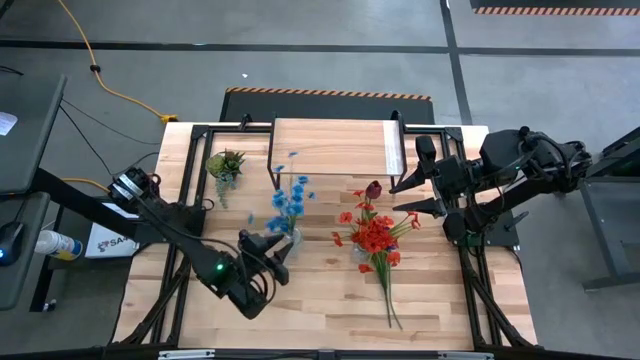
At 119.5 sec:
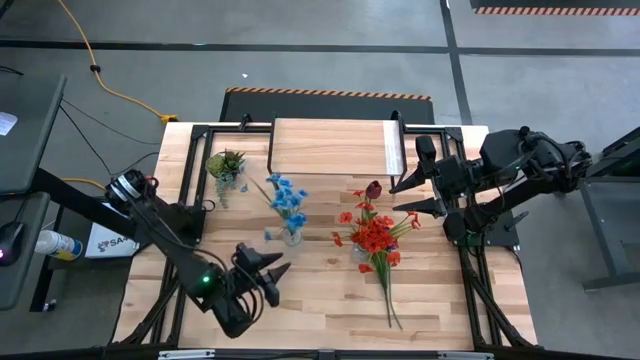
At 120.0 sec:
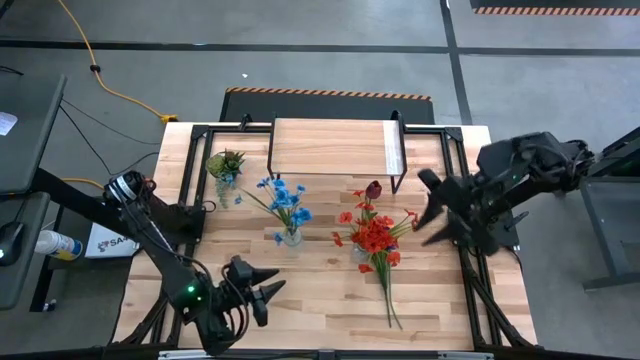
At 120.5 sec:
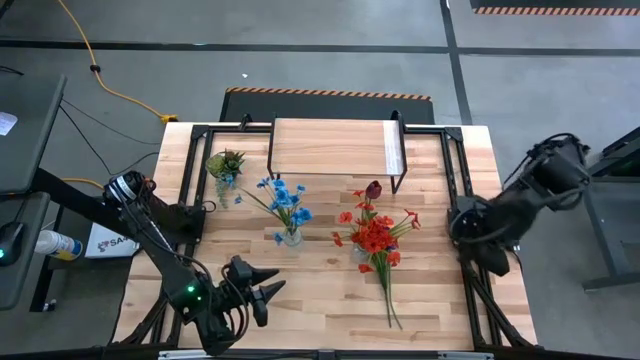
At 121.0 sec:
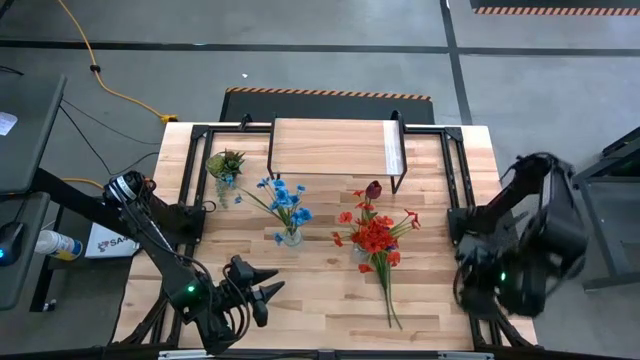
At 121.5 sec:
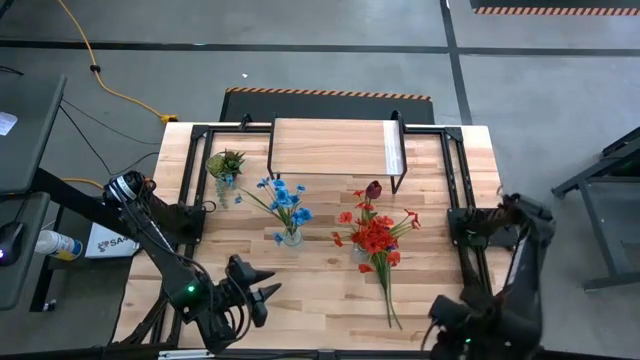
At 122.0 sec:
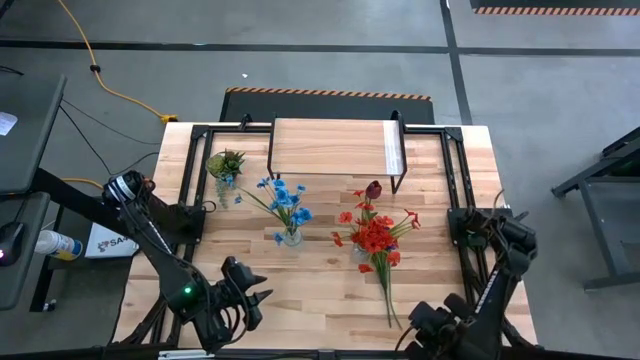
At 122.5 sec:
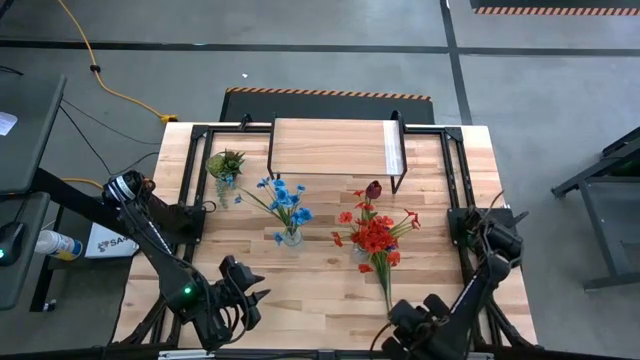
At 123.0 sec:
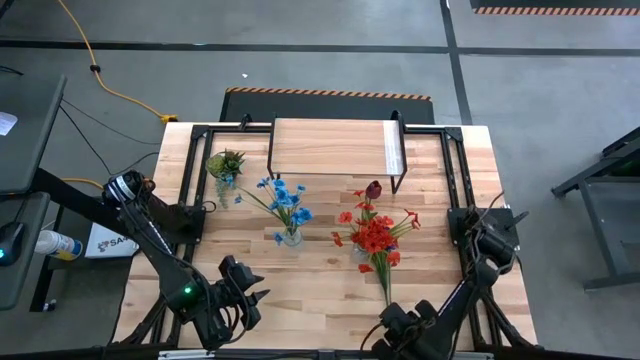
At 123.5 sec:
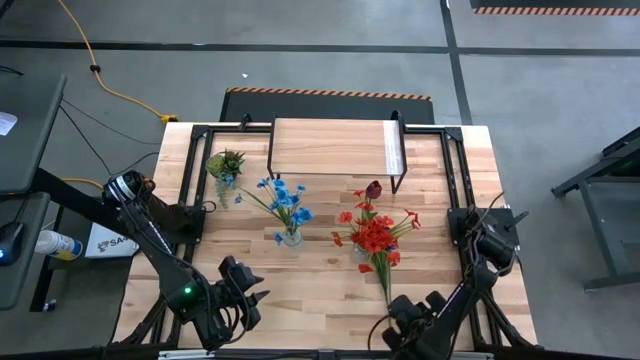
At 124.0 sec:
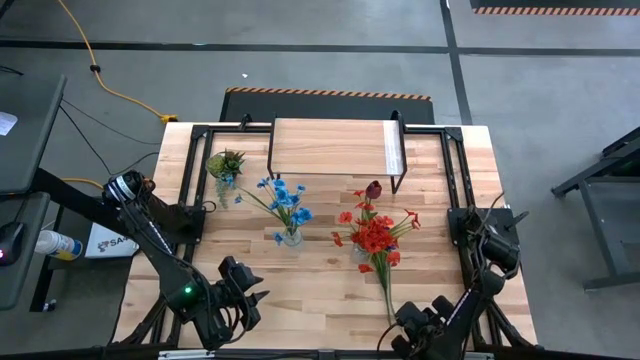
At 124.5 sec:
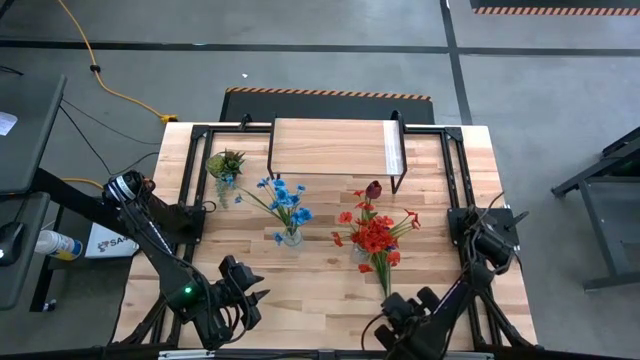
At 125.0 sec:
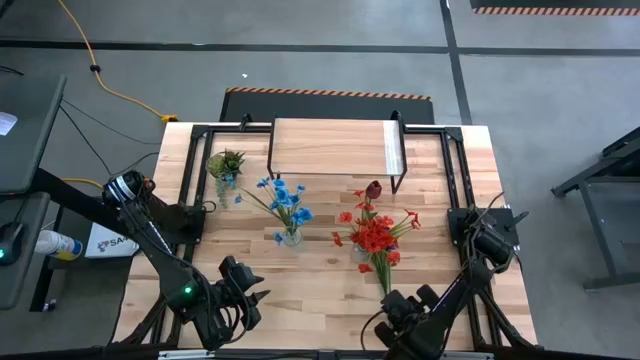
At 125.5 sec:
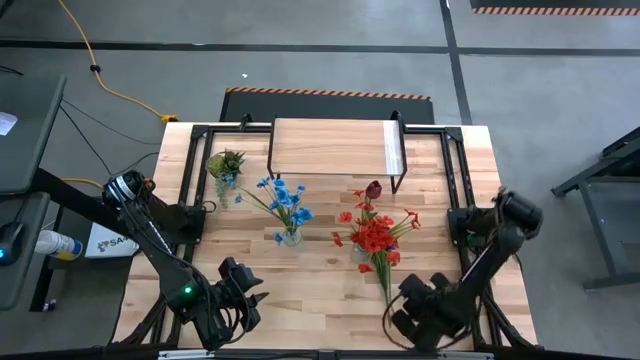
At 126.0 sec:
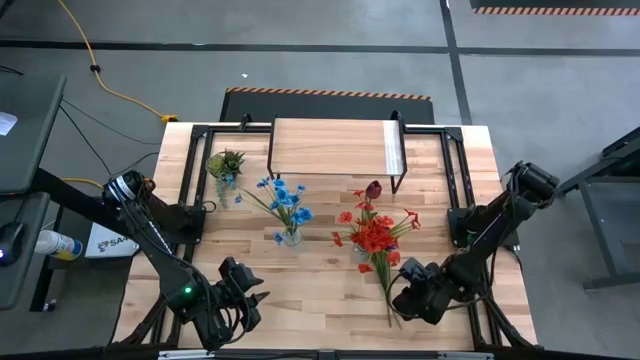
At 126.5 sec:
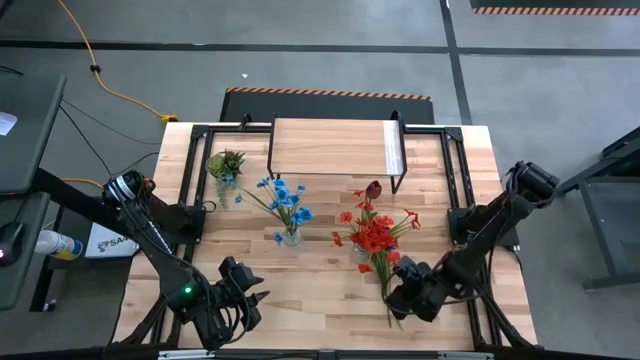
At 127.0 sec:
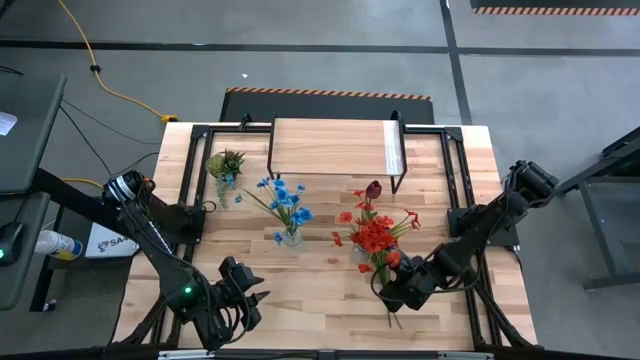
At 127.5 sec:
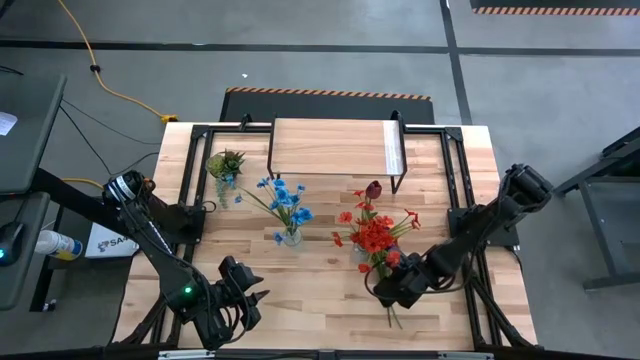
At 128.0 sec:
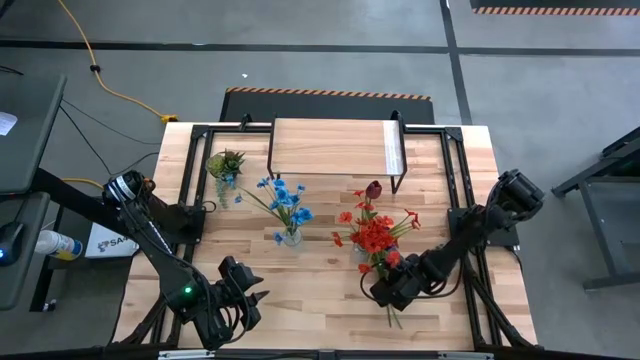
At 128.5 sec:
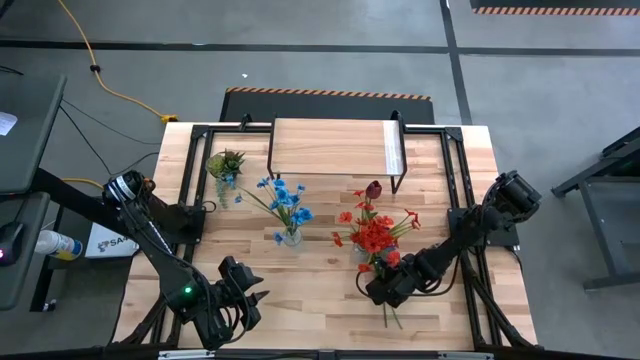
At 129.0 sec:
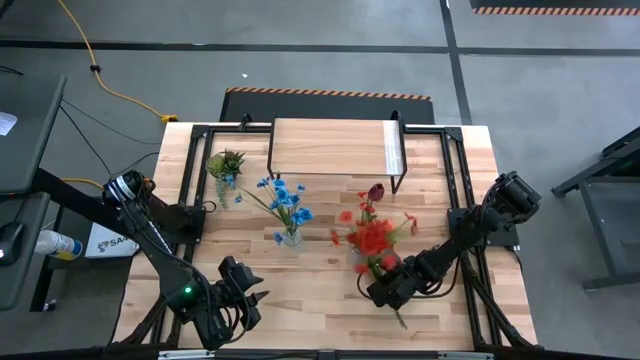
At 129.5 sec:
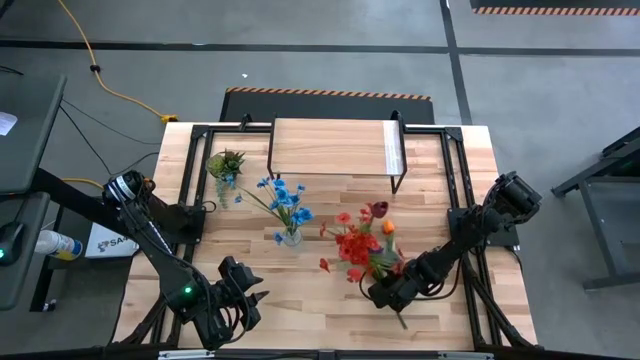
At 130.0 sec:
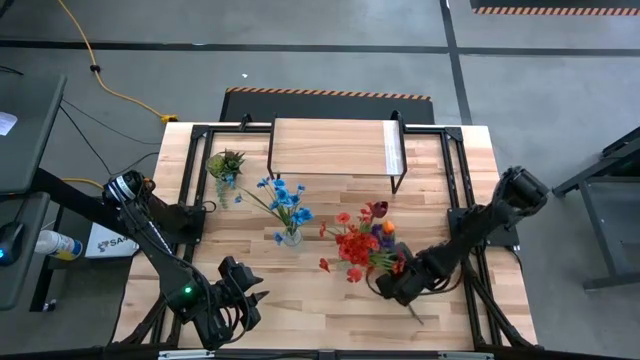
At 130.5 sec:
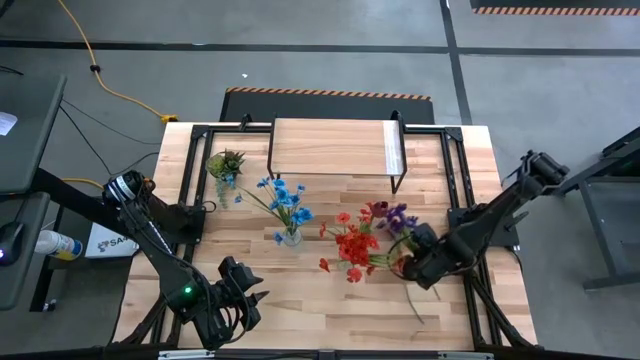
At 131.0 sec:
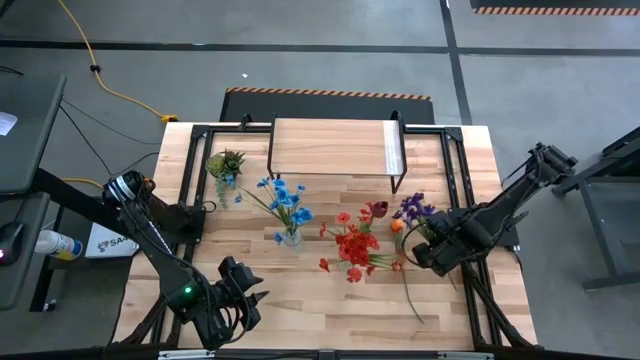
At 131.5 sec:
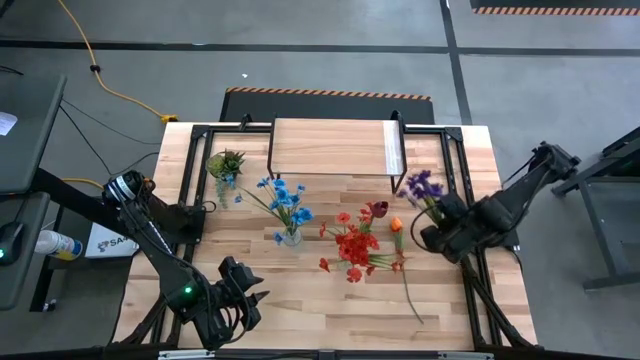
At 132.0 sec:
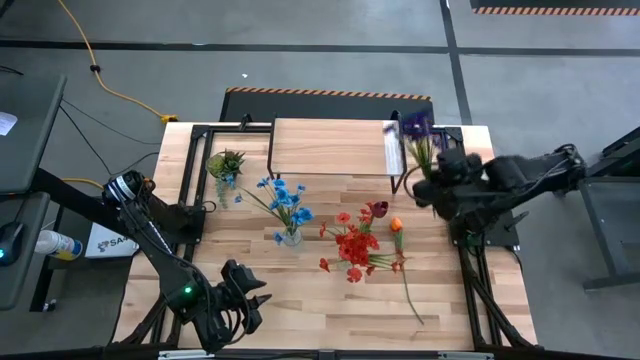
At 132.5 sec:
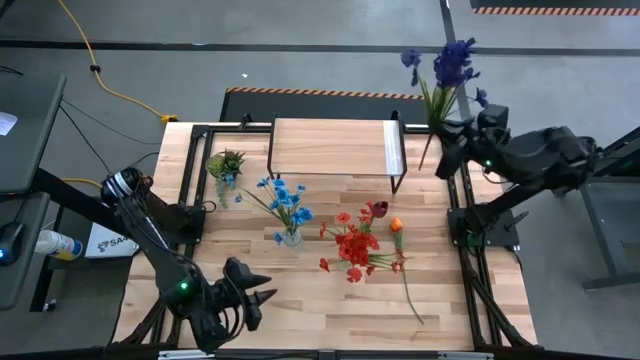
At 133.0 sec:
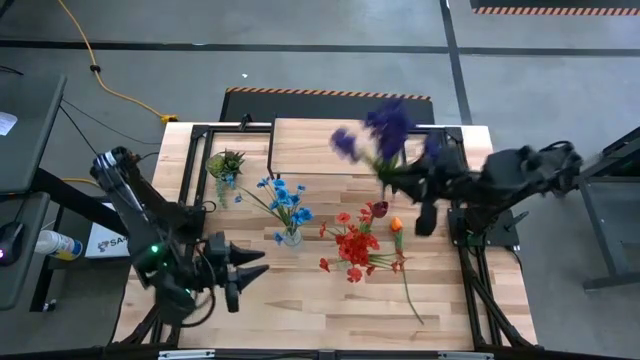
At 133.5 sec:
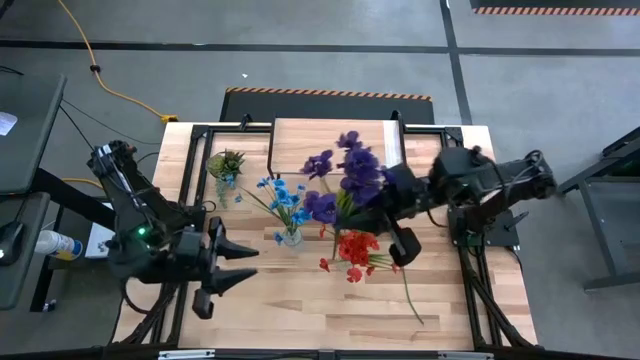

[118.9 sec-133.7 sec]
Task: Pick and place flowers into a vace then onto a shelf
Put the purple flowers into the left transparent vase

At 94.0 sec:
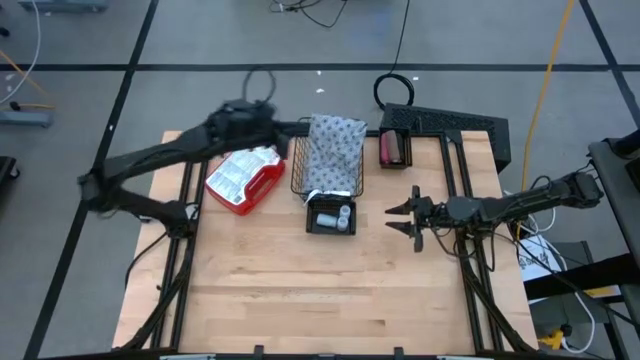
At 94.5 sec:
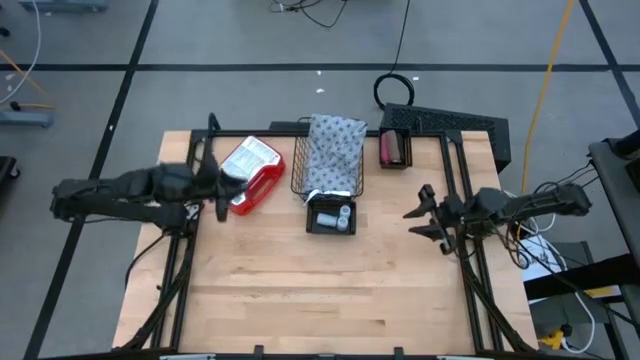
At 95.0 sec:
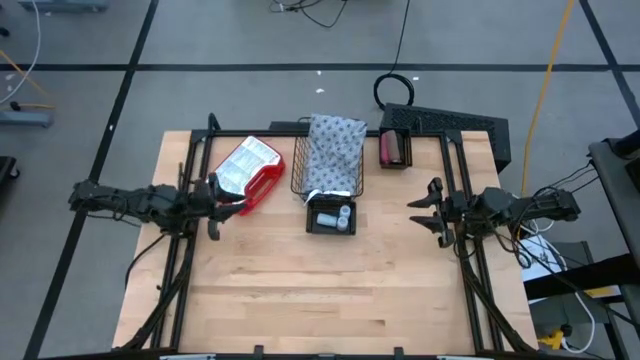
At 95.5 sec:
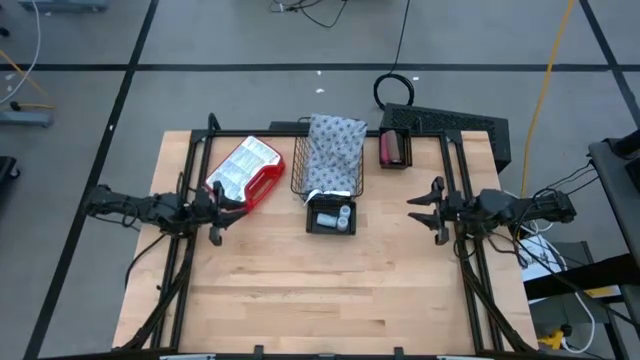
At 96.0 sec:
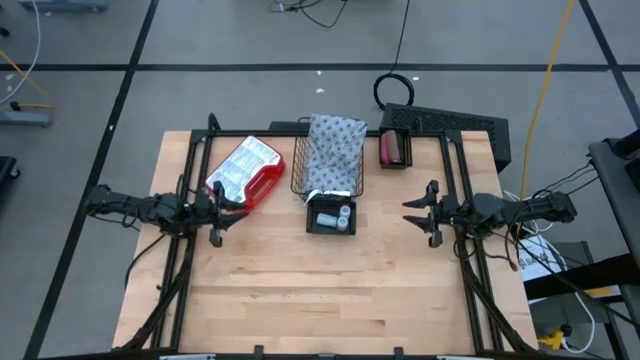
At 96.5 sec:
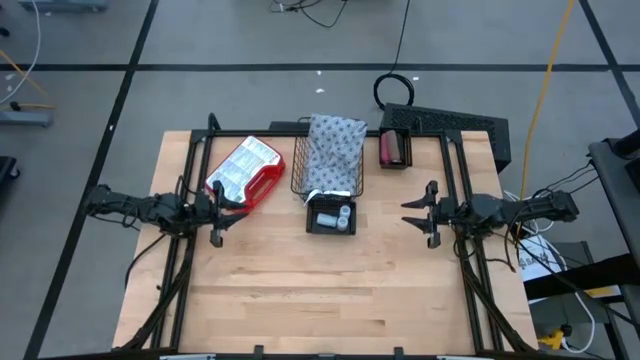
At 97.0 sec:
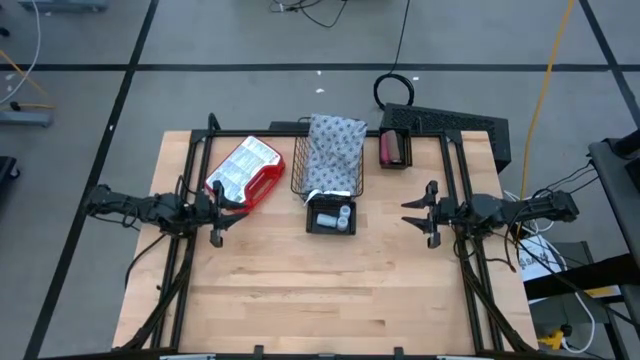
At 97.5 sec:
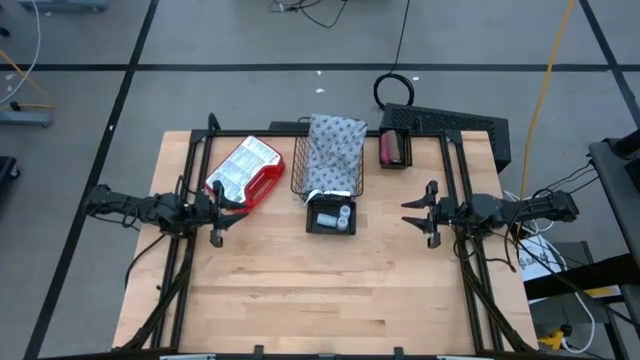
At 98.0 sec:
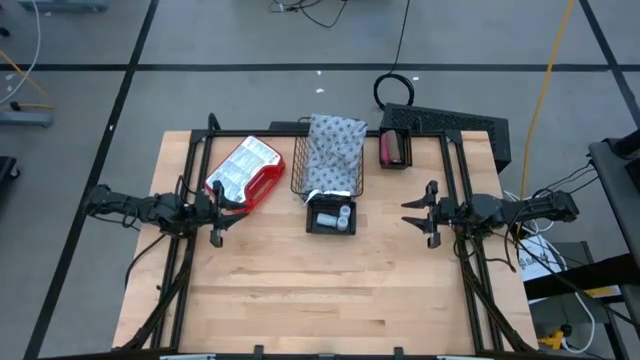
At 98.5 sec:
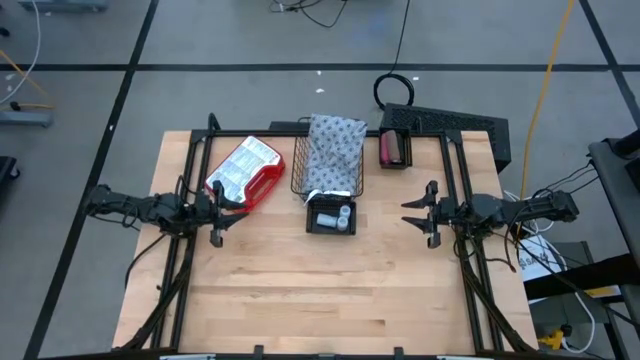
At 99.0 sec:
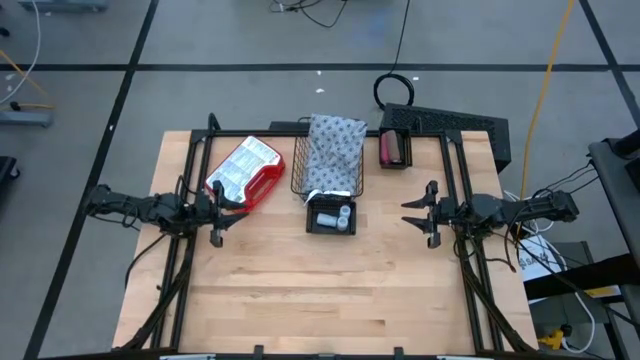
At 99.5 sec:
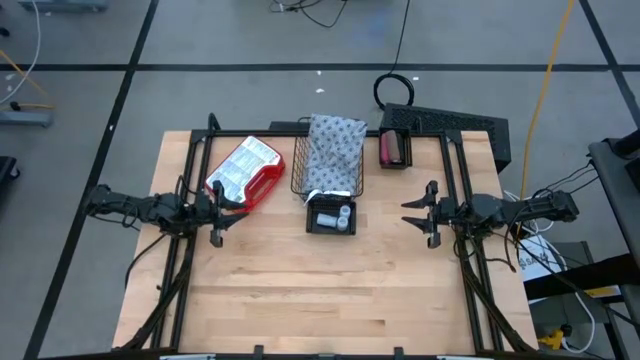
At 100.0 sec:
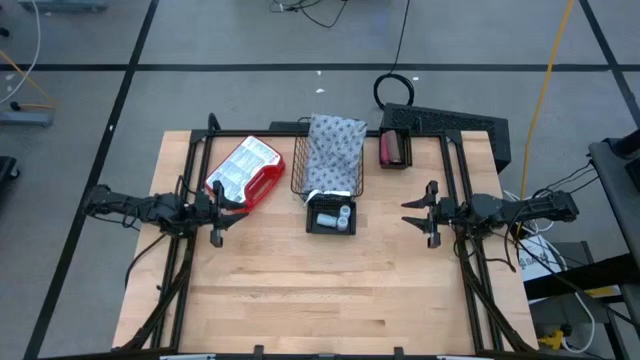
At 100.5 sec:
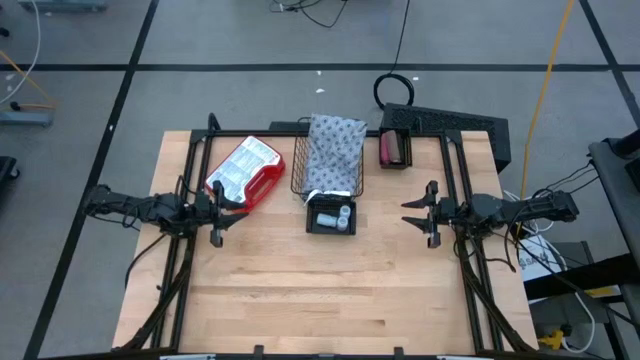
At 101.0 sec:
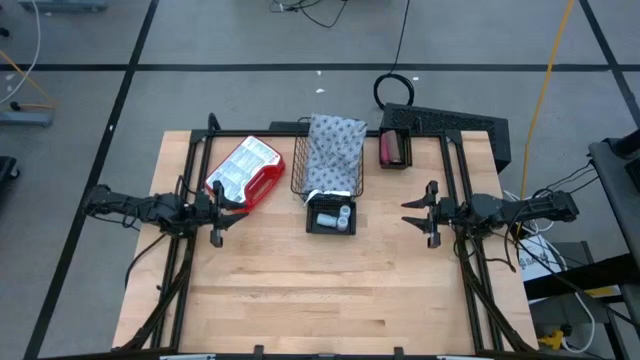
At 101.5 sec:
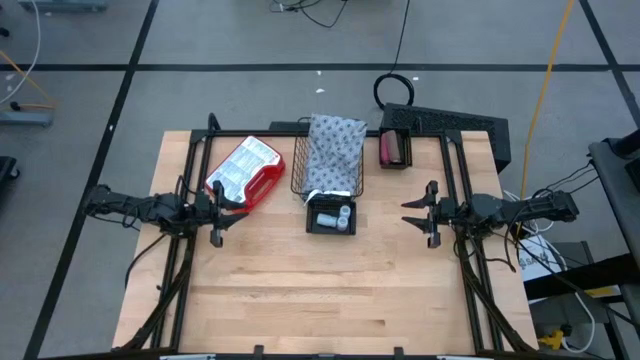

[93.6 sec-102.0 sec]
Task: Pick & place medical supplies in basket/bin
Return to Home Position
